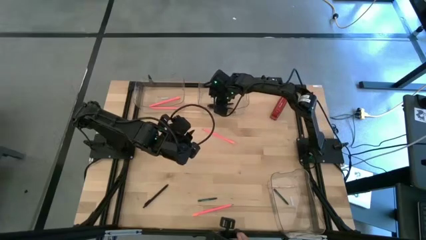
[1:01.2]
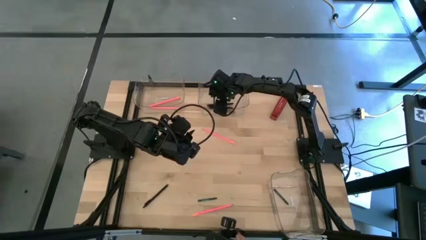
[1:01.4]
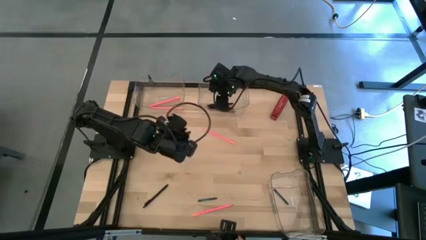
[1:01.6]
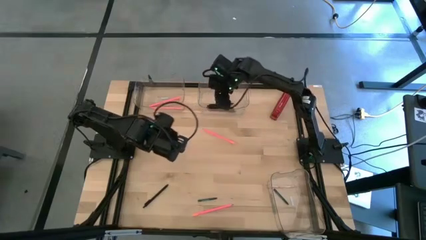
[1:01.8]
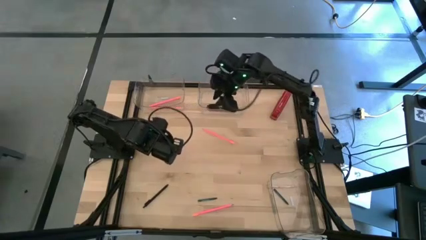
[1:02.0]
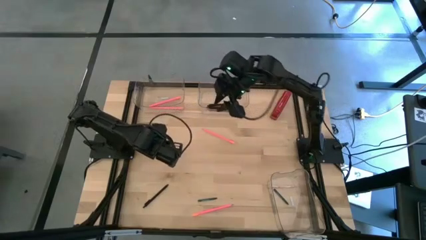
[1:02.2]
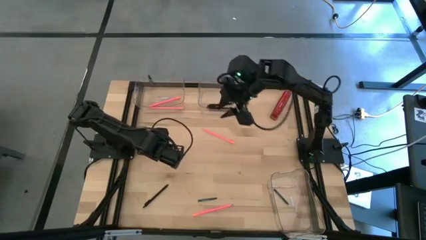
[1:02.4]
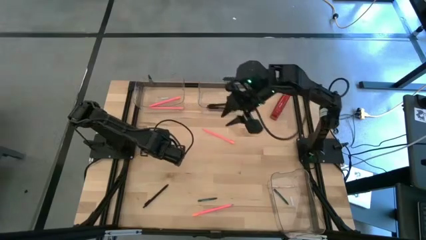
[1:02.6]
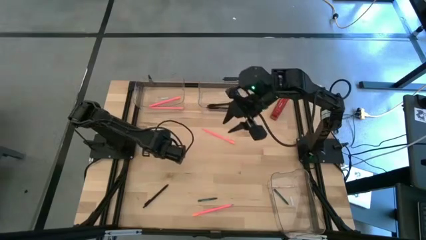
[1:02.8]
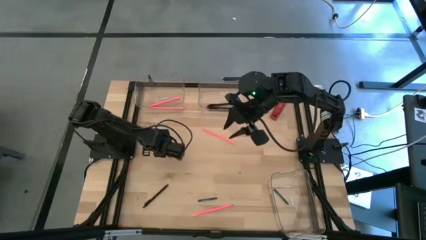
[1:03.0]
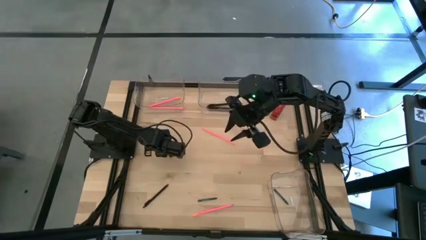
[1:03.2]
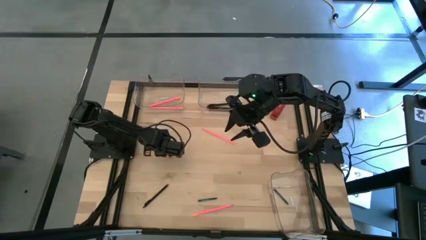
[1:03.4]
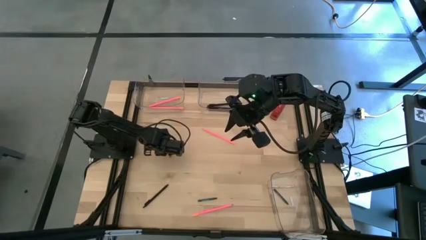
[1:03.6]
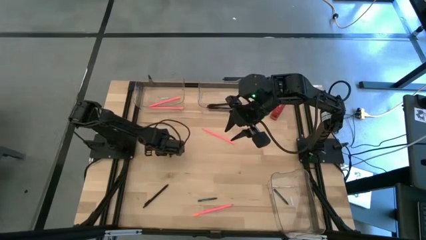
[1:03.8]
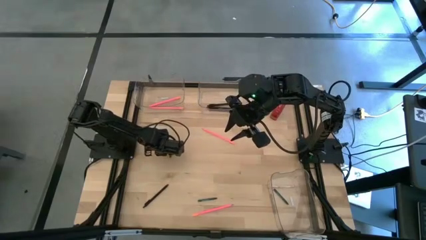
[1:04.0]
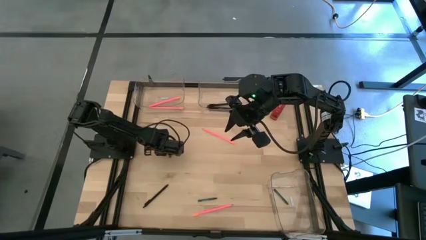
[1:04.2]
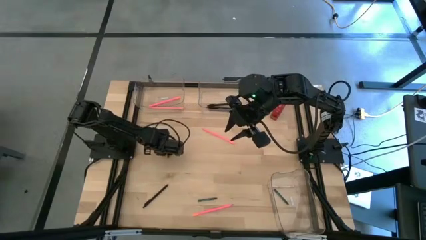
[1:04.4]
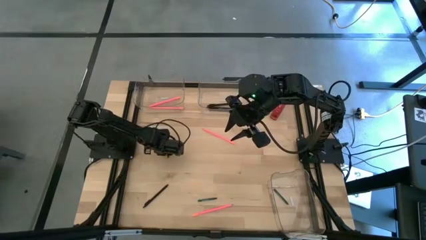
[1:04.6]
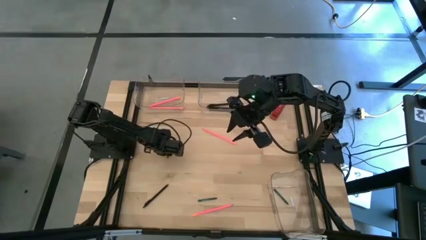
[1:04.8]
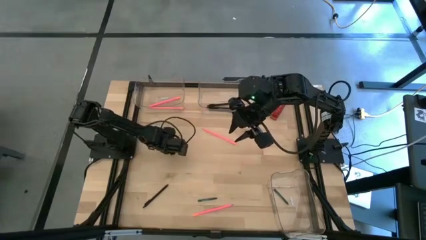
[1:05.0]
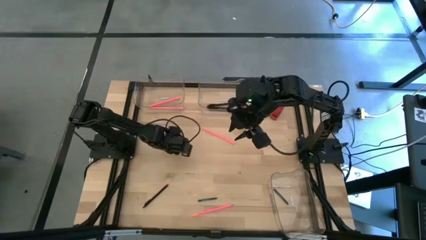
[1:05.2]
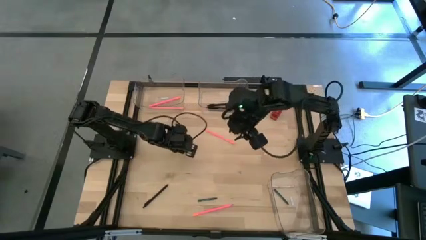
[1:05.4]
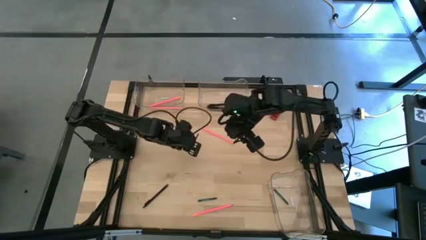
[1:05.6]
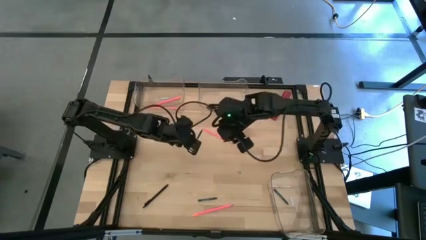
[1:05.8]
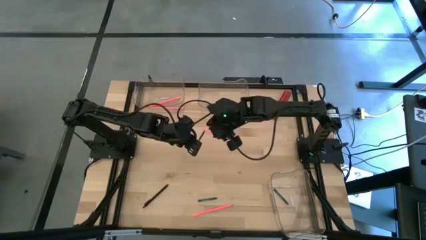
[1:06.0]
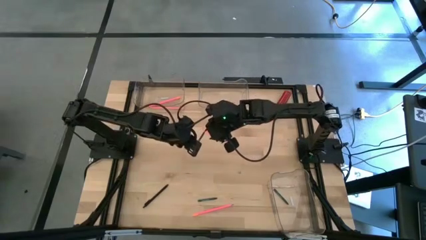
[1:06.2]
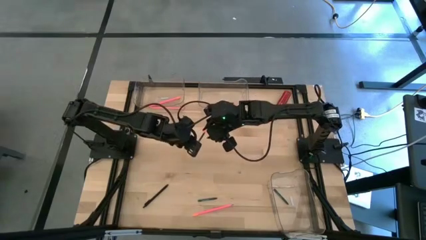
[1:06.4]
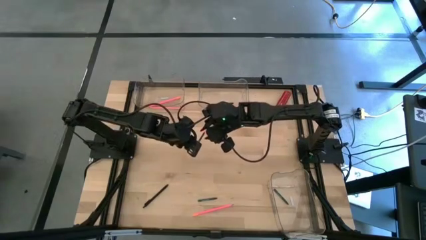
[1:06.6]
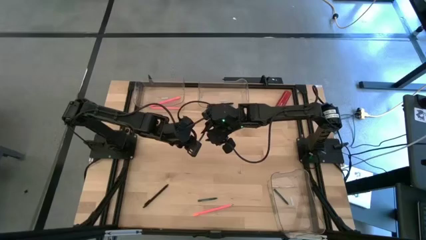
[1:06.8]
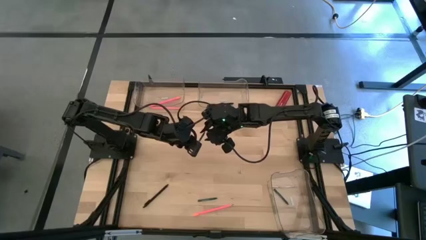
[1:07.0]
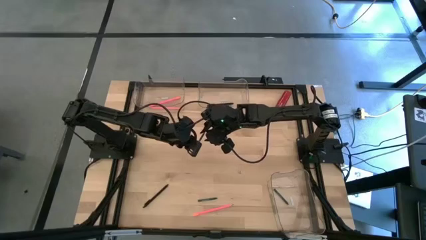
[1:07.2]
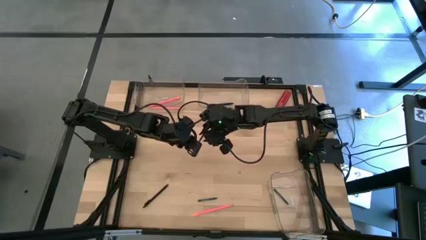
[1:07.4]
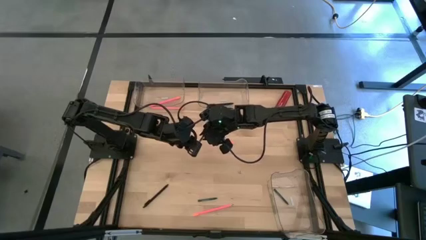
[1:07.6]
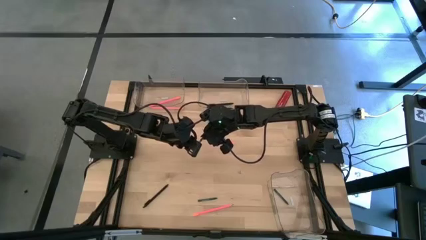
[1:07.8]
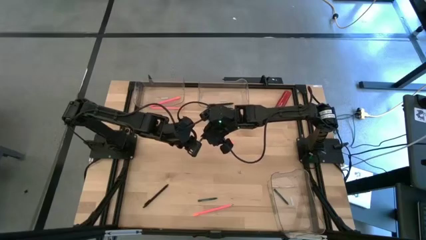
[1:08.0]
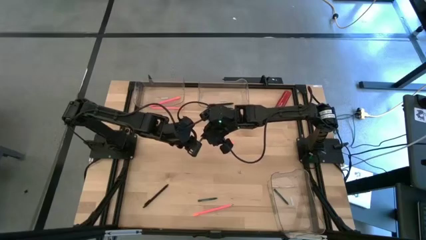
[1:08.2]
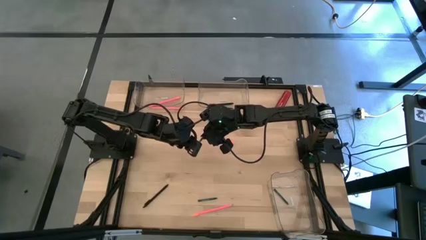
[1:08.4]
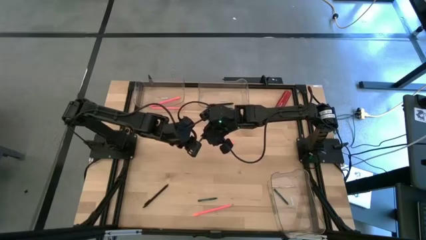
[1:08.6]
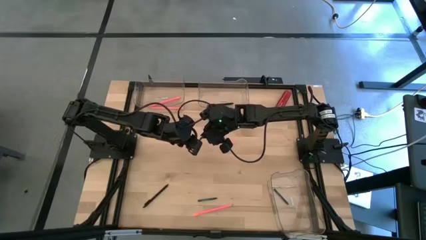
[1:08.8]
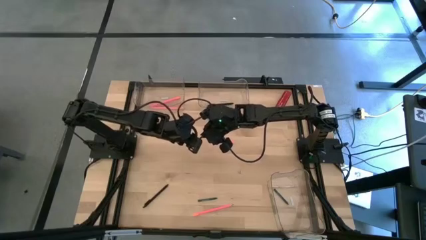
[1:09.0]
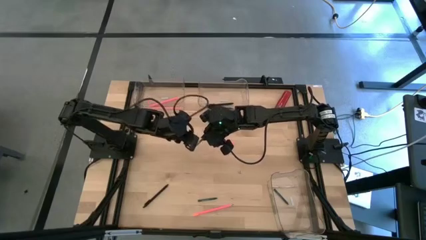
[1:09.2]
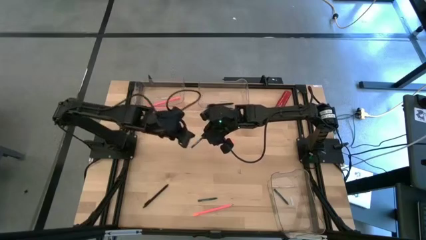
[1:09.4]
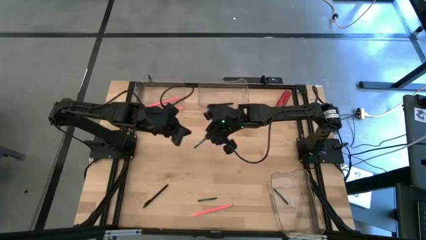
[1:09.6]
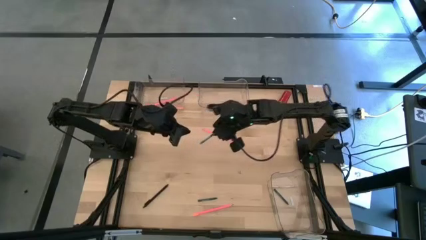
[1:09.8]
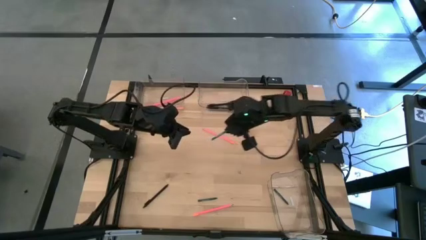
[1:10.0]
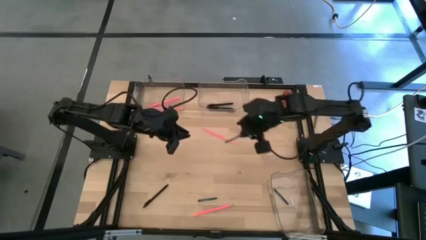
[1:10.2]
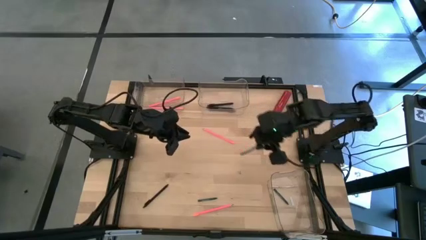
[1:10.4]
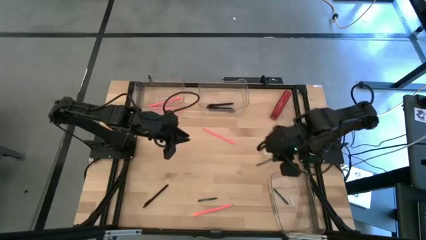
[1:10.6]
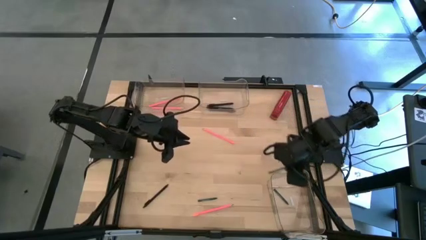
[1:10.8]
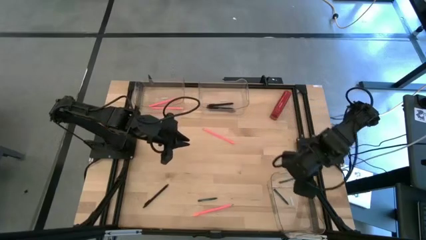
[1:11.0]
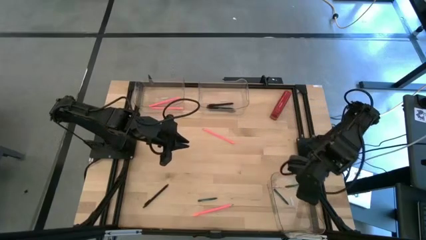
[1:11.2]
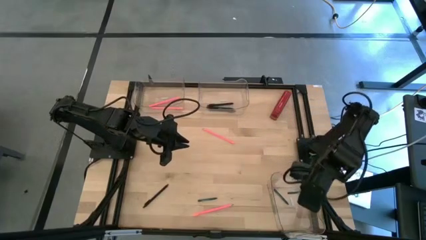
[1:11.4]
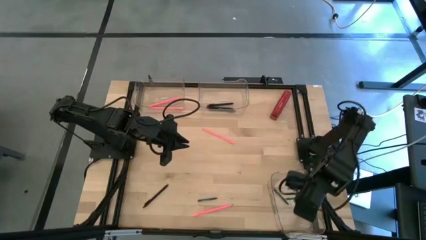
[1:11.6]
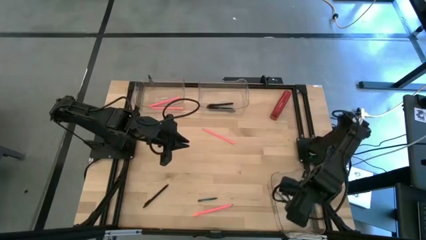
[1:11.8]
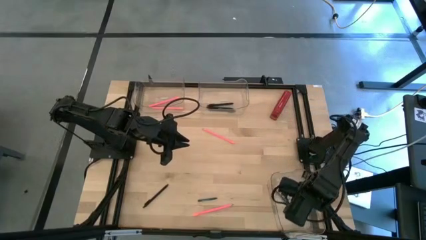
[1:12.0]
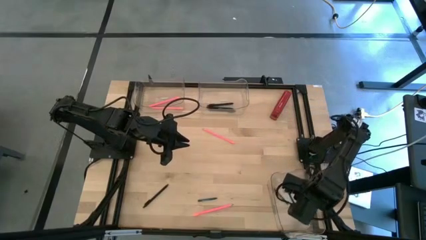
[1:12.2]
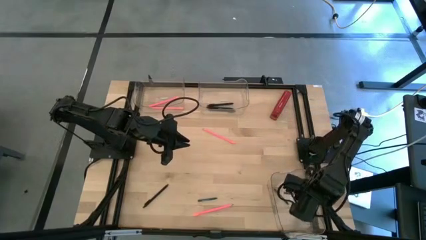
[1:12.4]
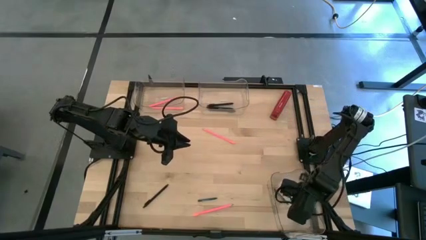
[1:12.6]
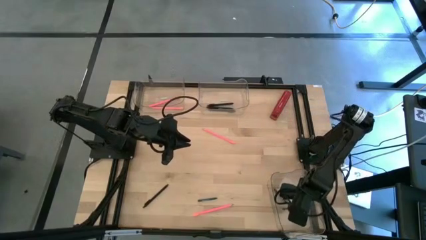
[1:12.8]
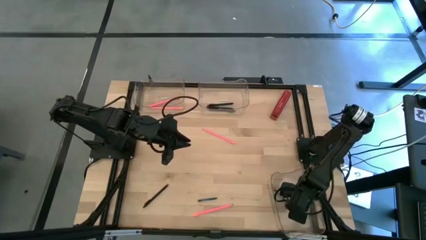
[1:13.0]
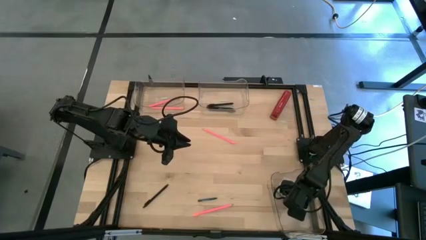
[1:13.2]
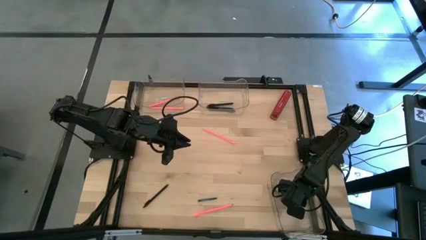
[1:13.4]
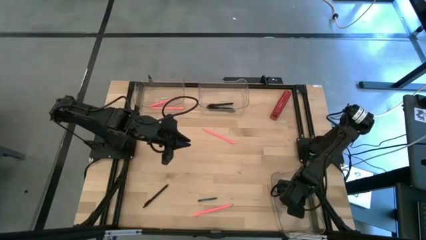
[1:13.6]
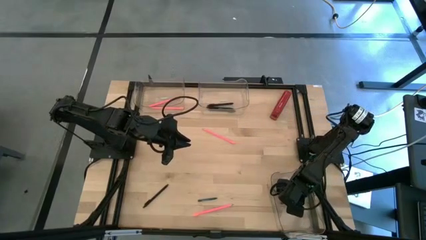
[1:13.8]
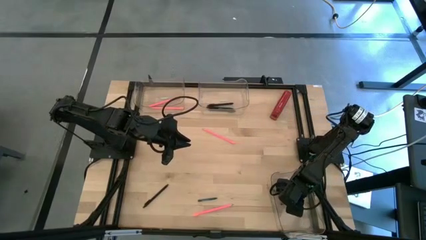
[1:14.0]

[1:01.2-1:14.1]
Task: Sort crayons/erasers/pens/pencils in bins
Put the green crayon into the bottom transparent bin
